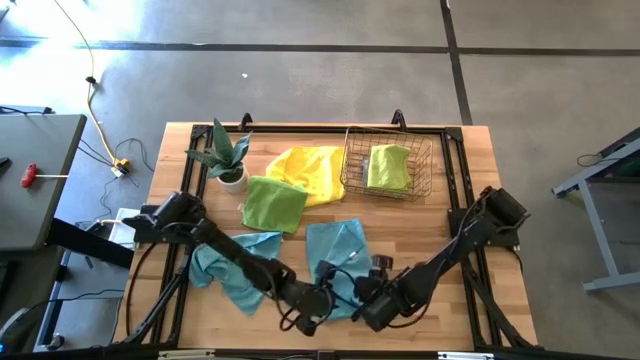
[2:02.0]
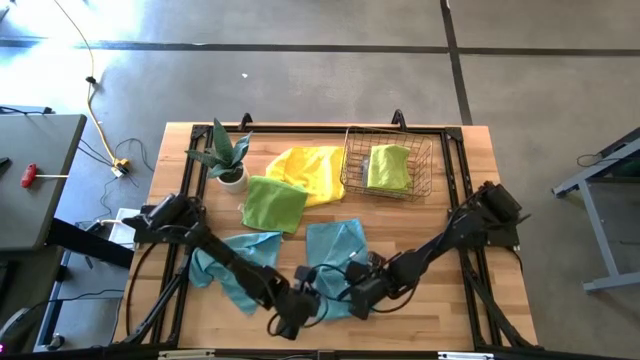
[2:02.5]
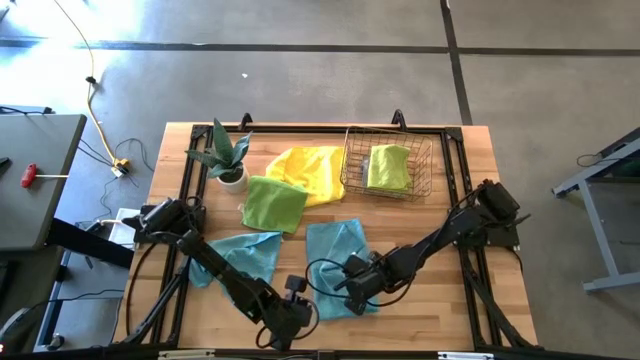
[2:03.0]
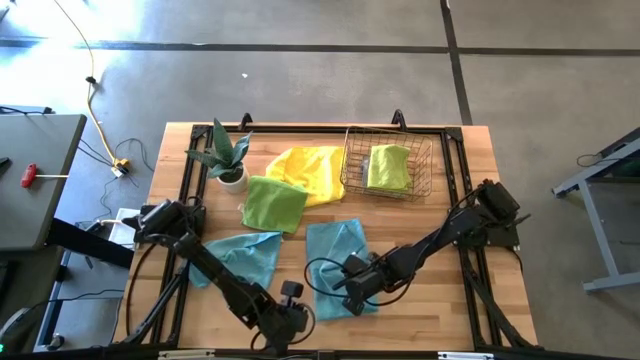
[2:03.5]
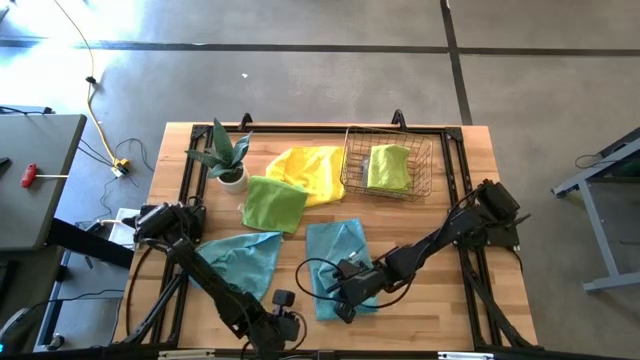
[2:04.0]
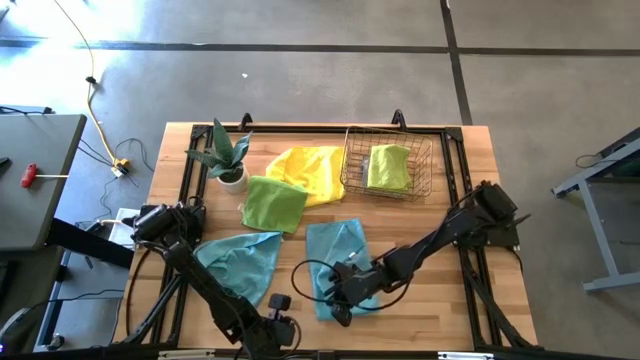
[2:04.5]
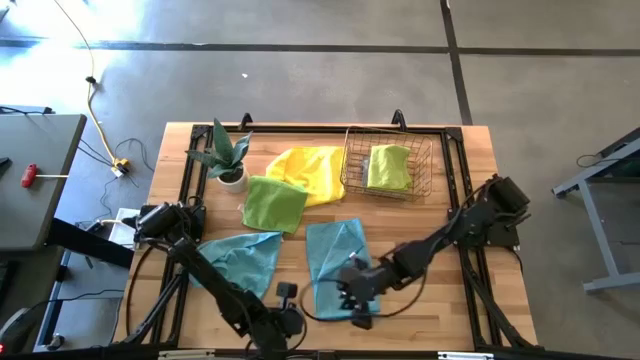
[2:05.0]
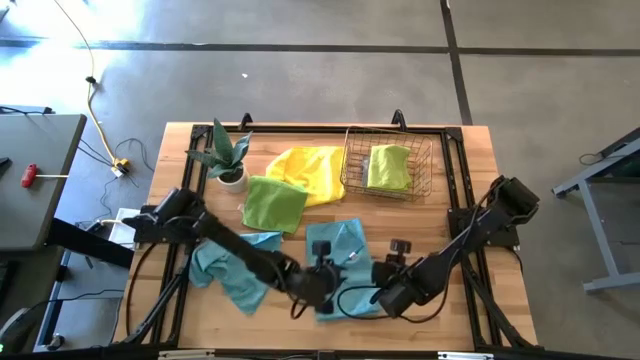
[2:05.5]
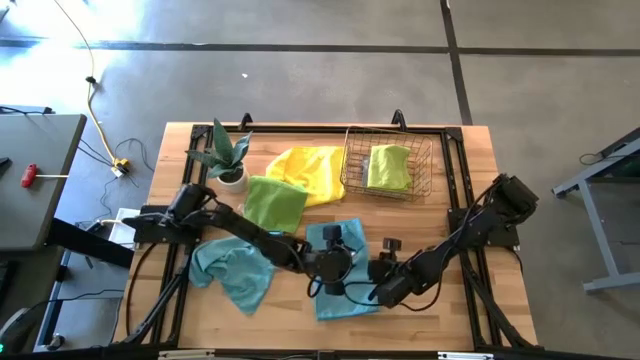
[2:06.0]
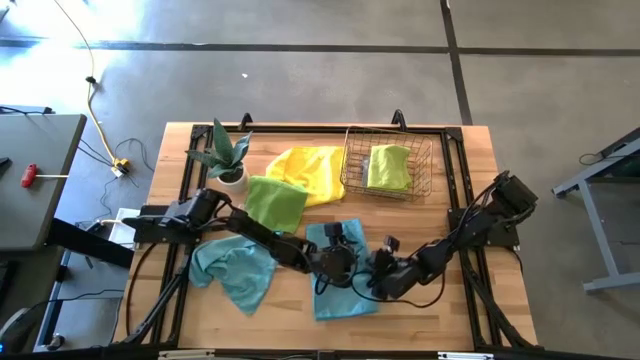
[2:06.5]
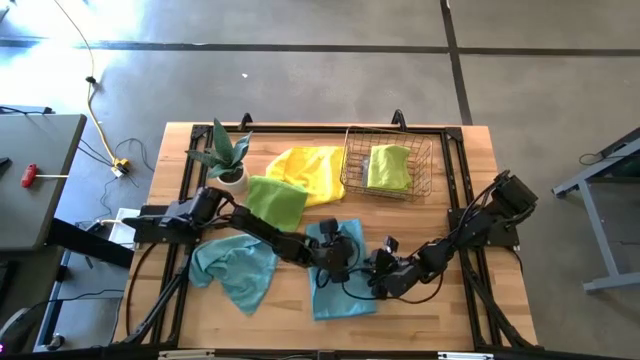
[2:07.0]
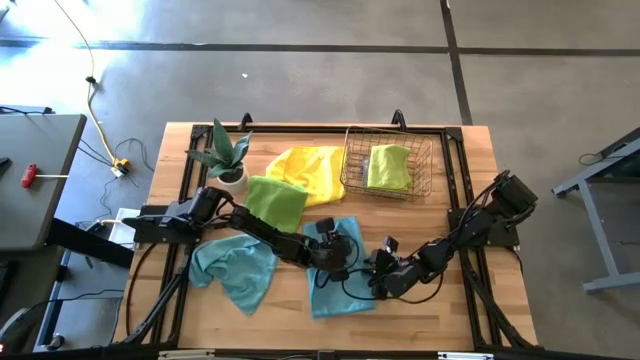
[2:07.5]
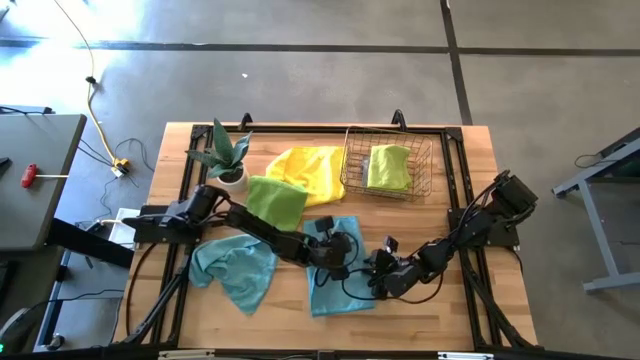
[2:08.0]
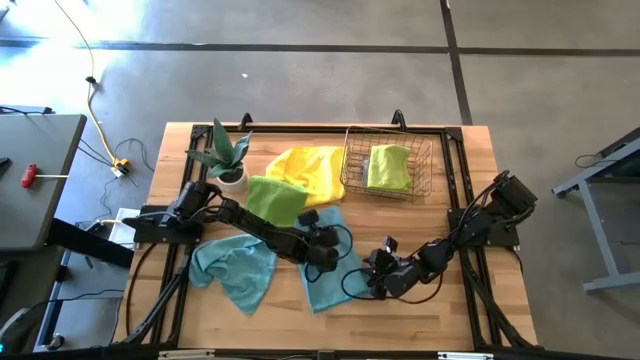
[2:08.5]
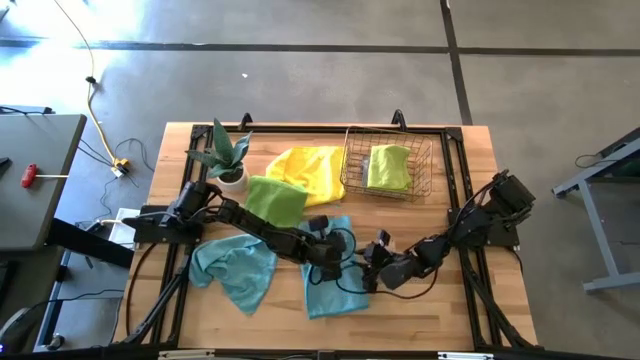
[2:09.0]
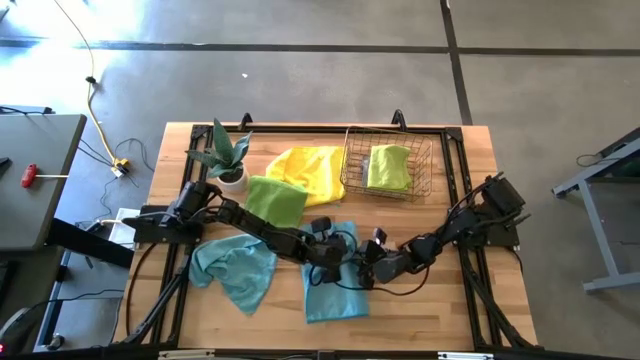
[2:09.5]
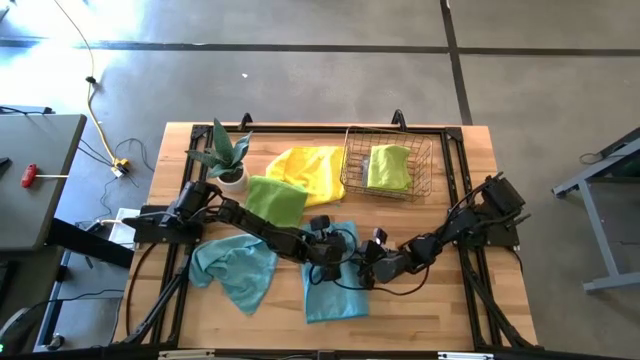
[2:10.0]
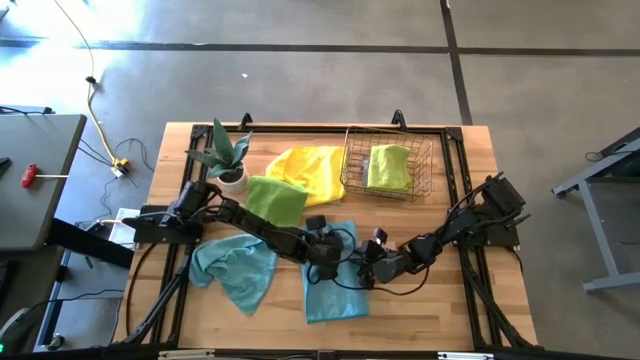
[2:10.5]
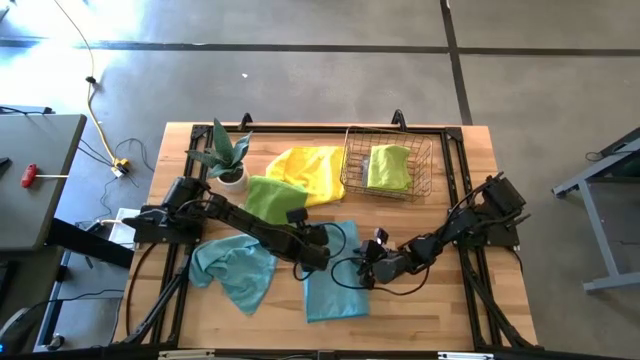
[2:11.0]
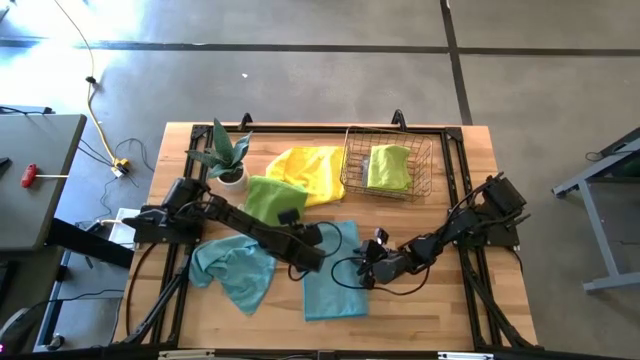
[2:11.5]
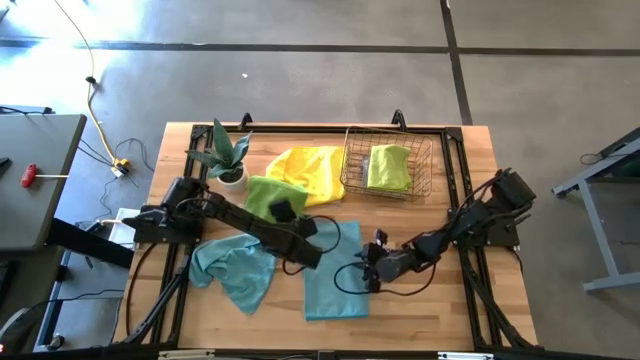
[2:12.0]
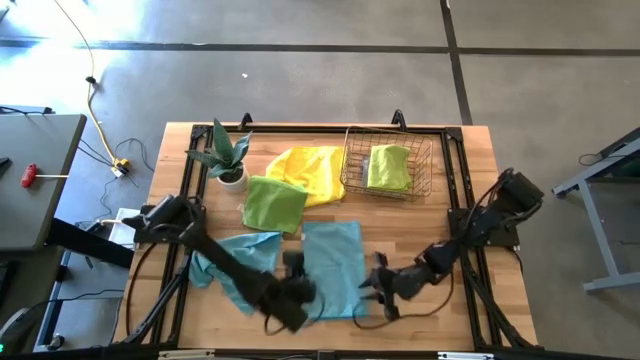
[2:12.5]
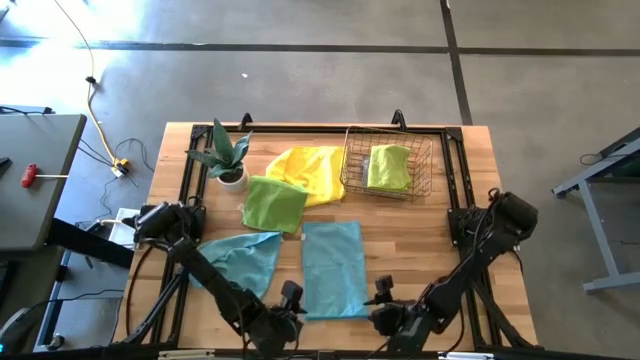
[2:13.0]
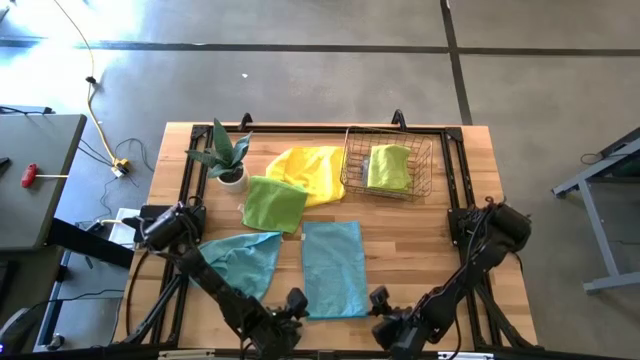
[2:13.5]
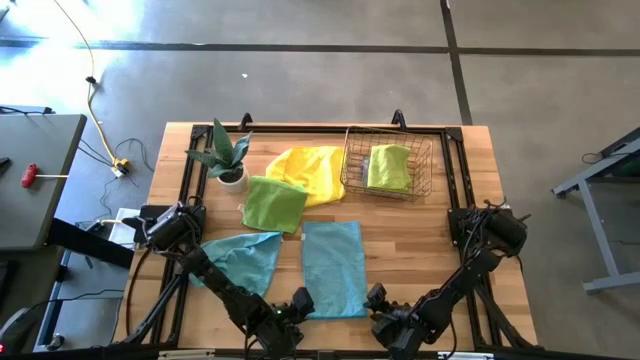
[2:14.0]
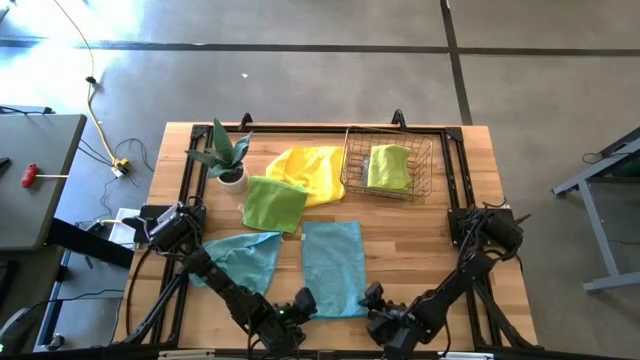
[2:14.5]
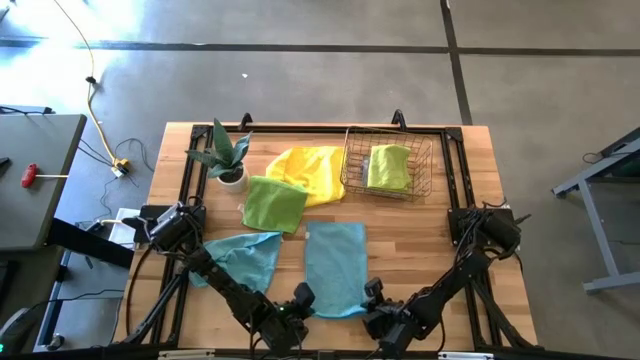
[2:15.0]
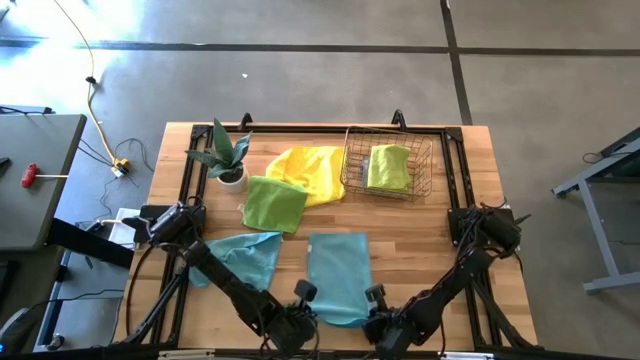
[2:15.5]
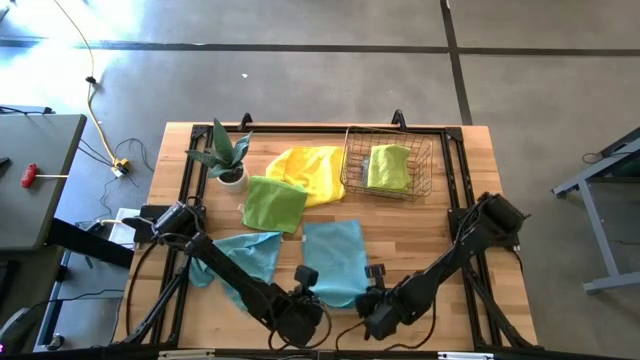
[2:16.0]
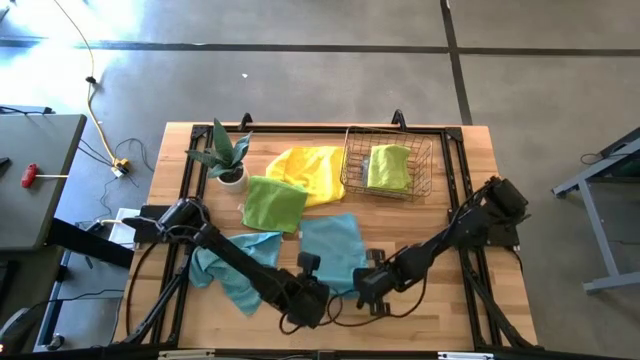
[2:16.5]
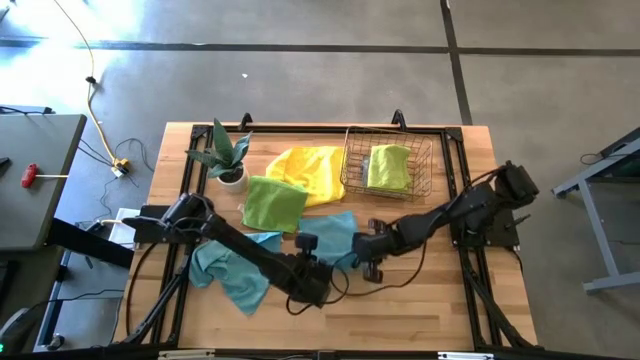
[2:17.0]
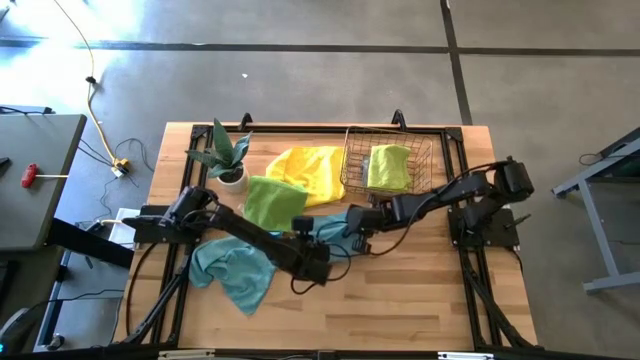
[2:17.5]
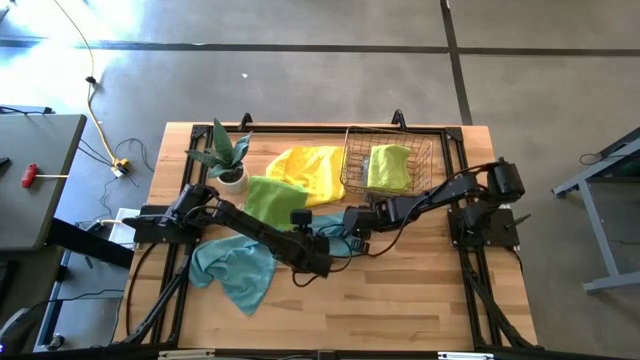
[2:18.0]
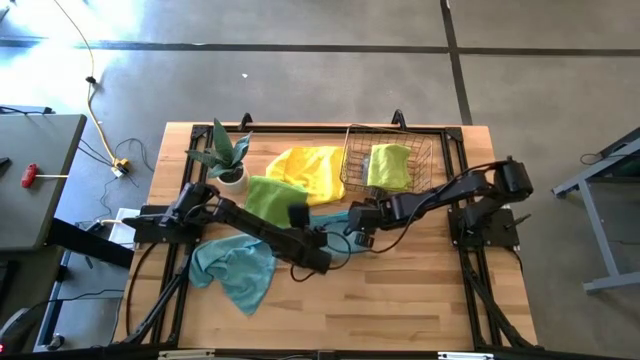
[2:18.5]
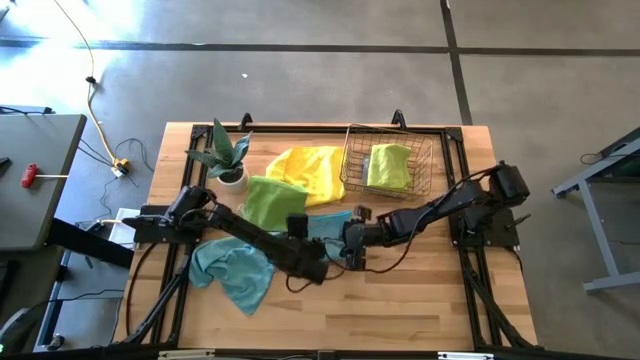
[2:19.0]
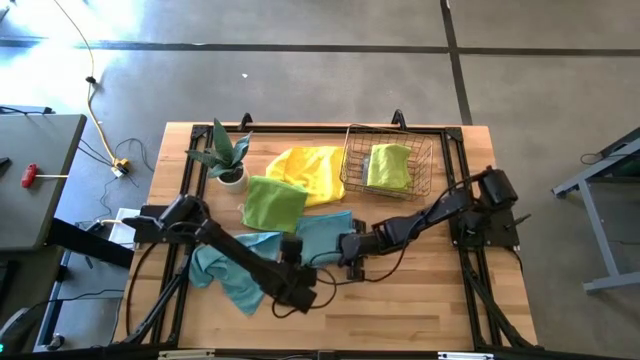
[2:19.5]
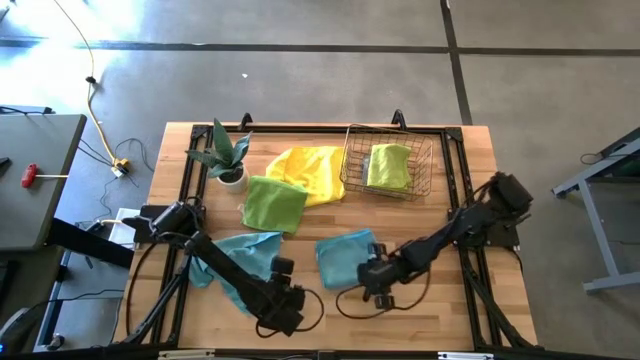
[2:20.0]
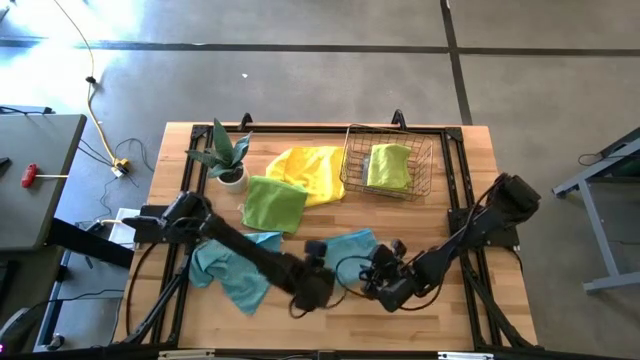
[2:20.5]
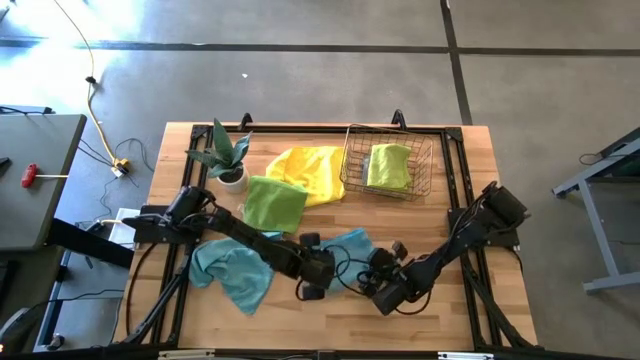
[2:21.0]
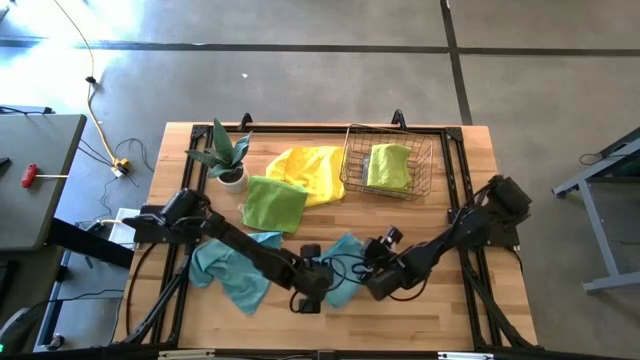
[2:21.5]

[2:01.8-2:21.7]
Task: Fold microfiber towels
Fold the right blue microfiber towel
